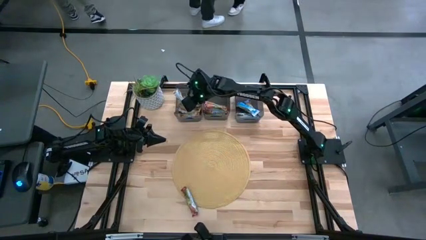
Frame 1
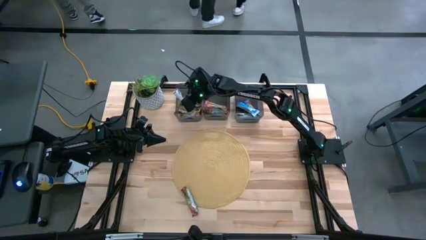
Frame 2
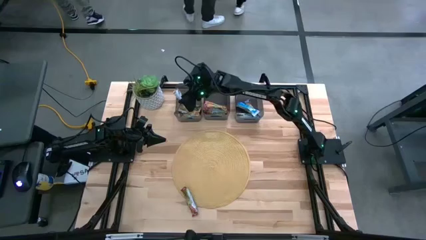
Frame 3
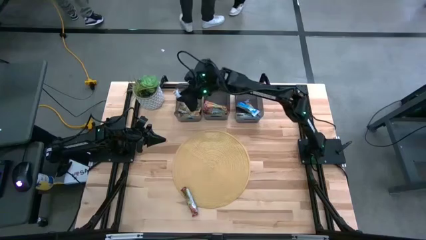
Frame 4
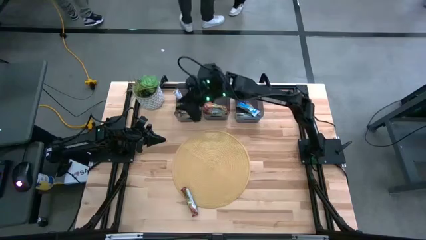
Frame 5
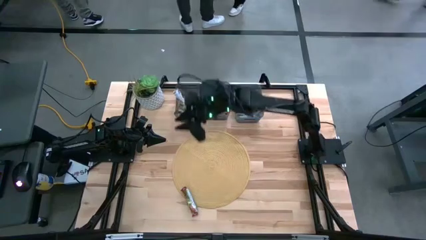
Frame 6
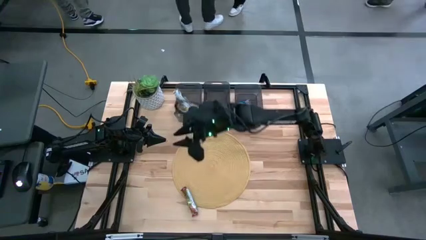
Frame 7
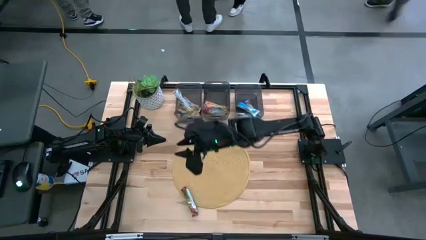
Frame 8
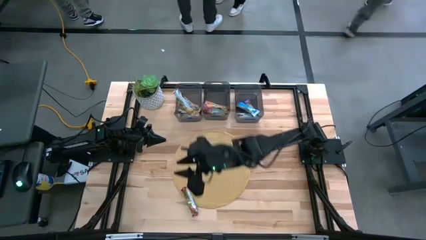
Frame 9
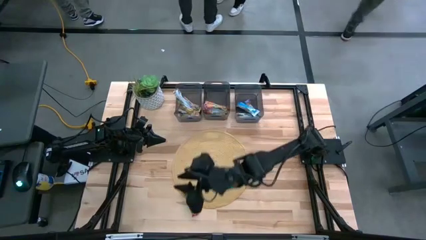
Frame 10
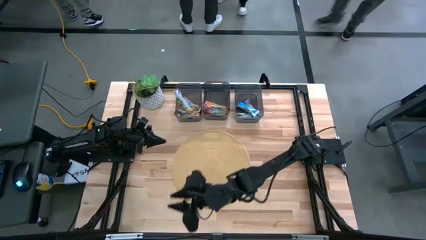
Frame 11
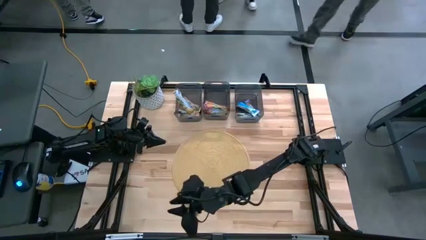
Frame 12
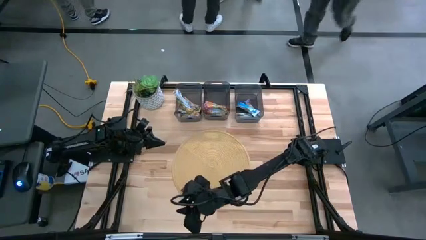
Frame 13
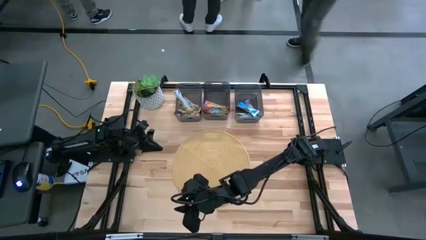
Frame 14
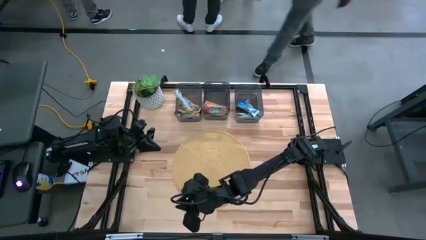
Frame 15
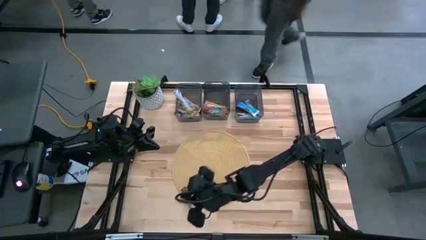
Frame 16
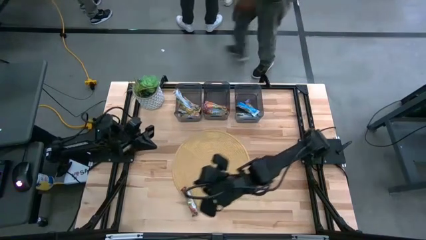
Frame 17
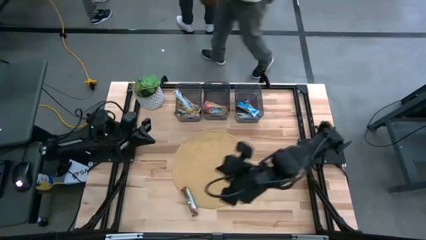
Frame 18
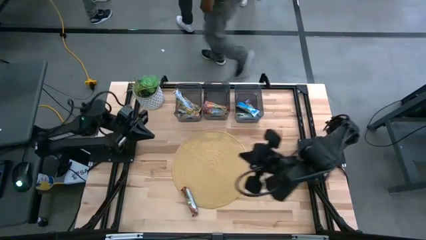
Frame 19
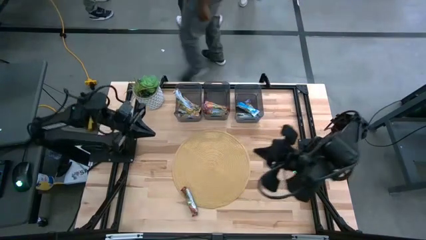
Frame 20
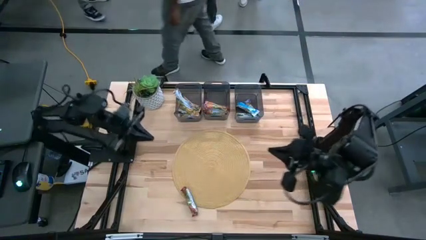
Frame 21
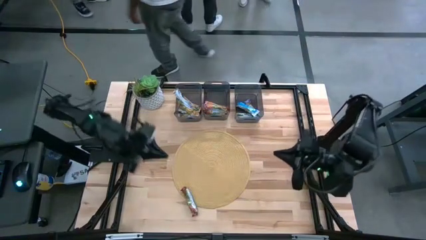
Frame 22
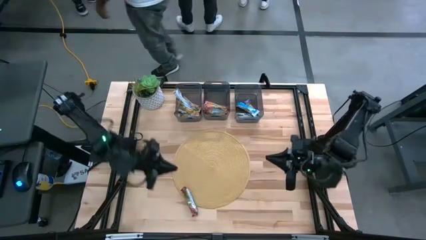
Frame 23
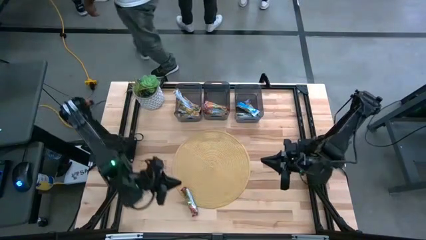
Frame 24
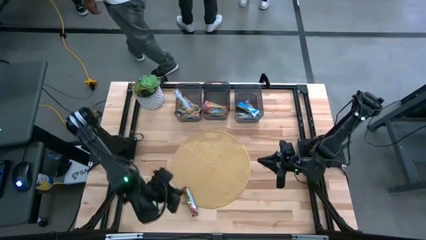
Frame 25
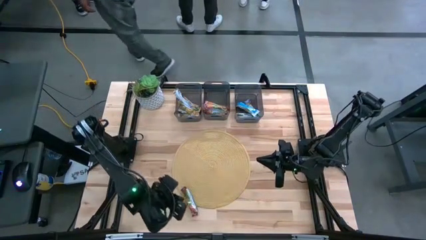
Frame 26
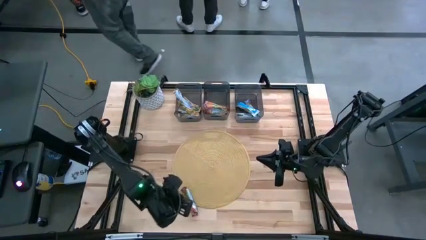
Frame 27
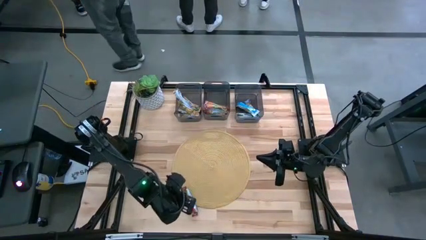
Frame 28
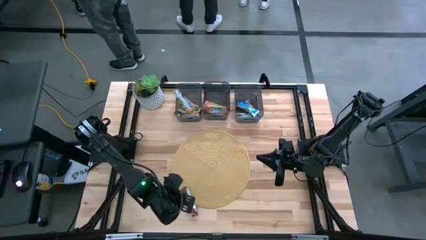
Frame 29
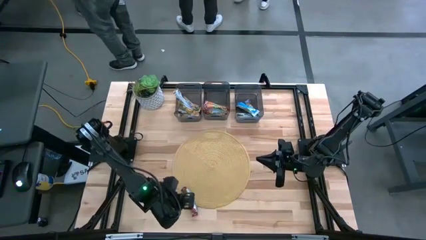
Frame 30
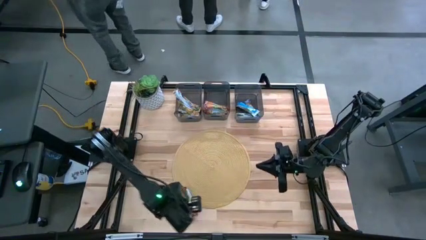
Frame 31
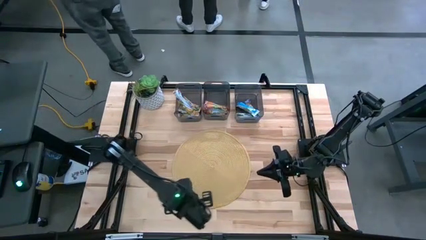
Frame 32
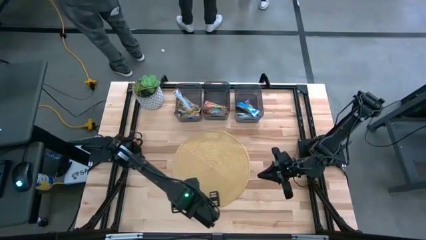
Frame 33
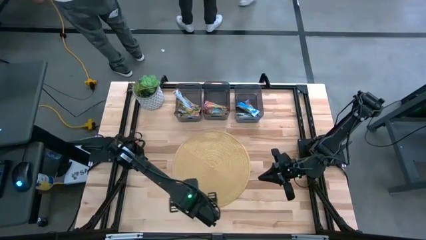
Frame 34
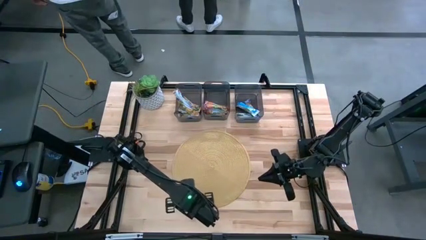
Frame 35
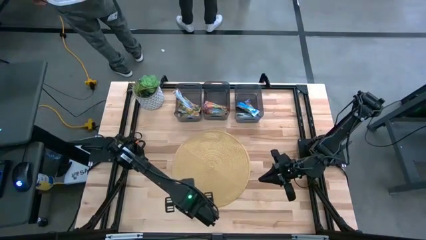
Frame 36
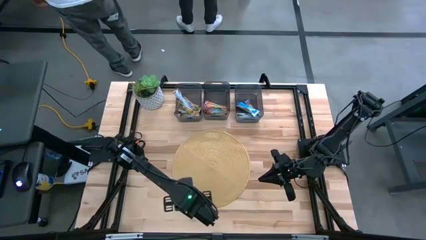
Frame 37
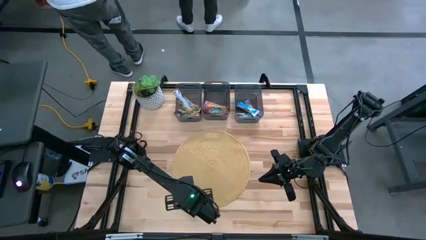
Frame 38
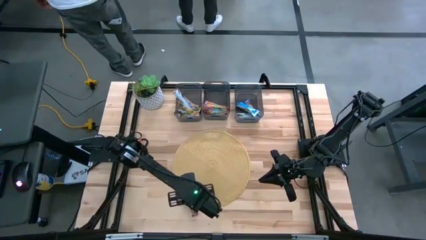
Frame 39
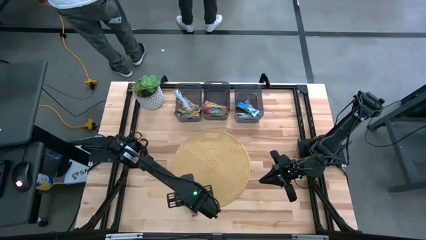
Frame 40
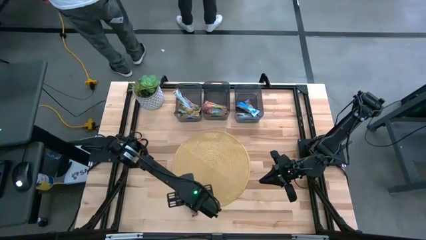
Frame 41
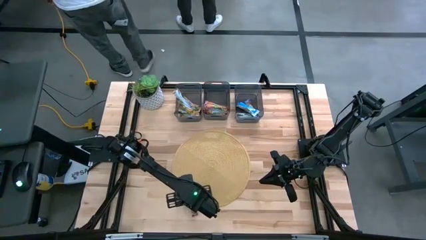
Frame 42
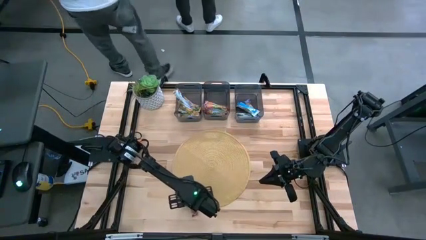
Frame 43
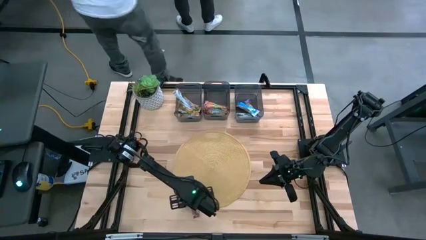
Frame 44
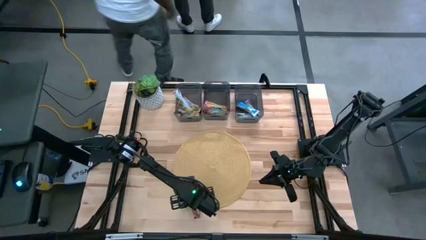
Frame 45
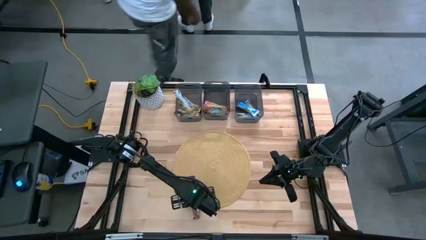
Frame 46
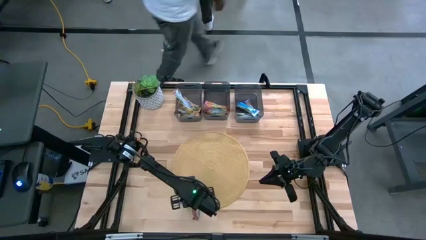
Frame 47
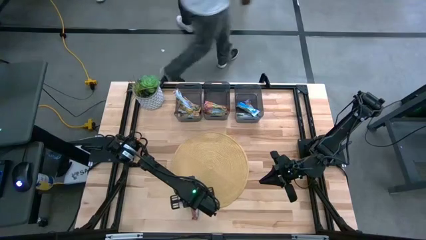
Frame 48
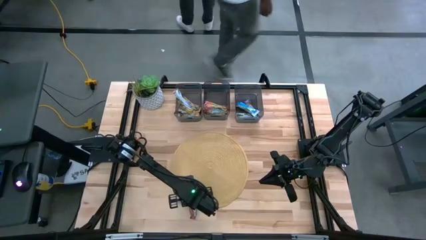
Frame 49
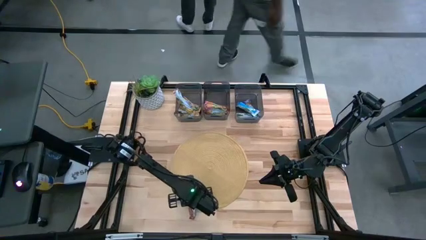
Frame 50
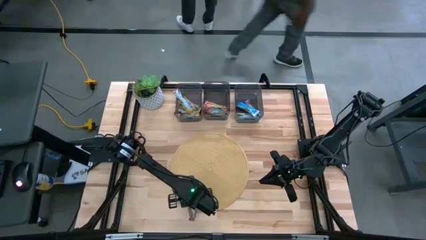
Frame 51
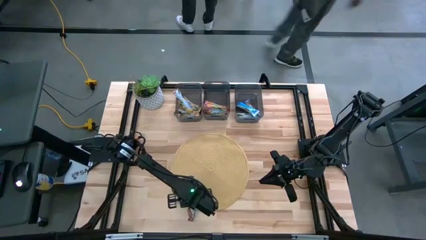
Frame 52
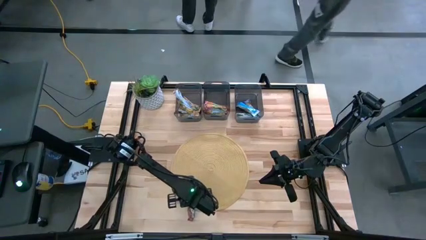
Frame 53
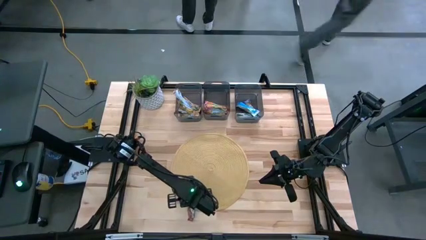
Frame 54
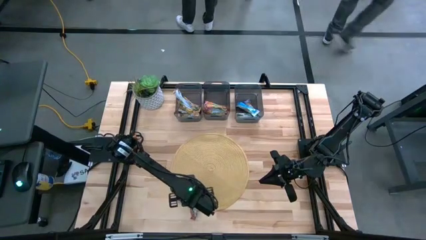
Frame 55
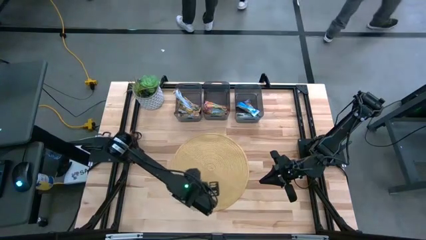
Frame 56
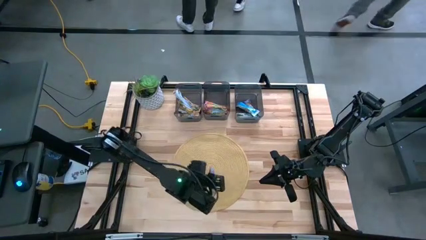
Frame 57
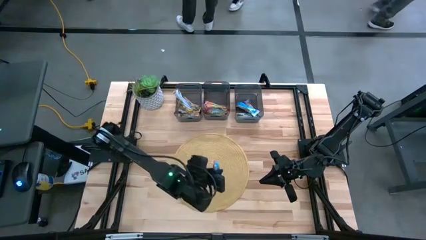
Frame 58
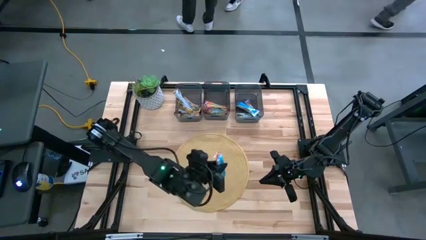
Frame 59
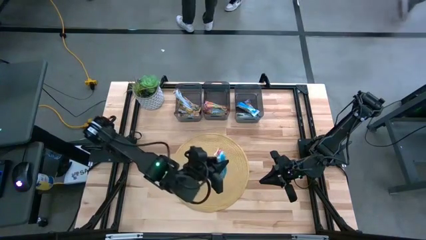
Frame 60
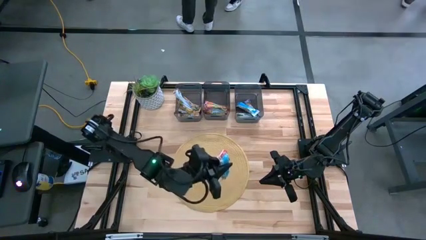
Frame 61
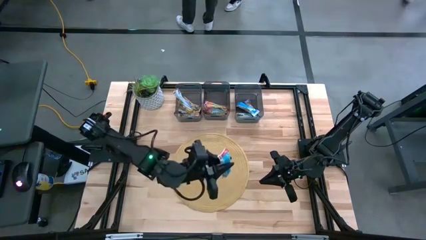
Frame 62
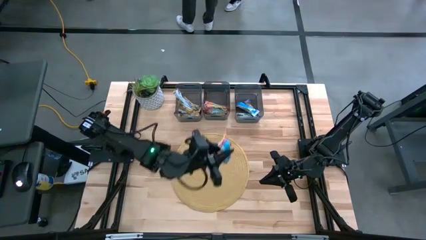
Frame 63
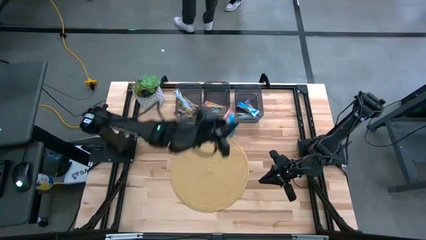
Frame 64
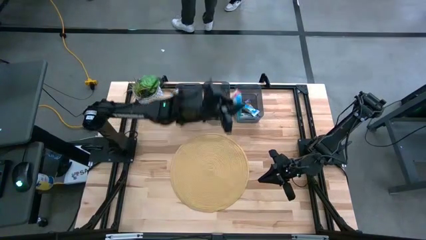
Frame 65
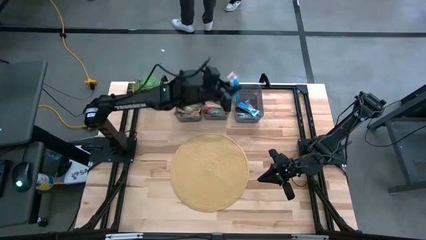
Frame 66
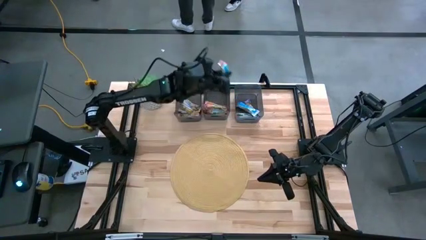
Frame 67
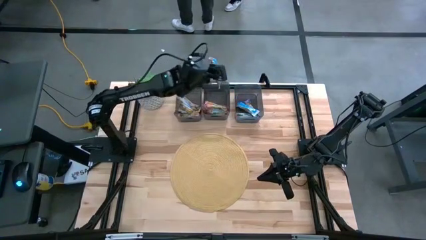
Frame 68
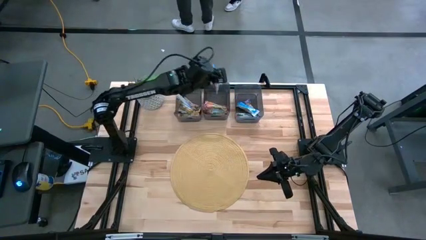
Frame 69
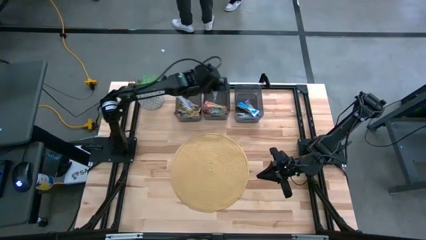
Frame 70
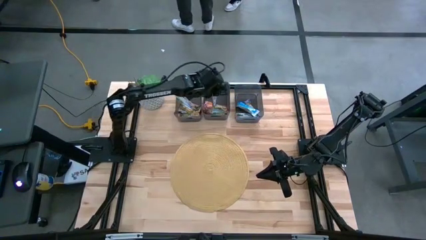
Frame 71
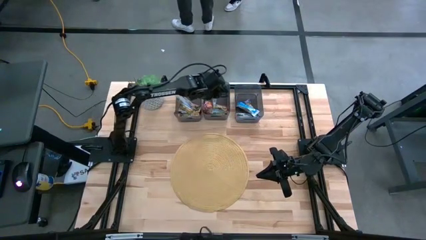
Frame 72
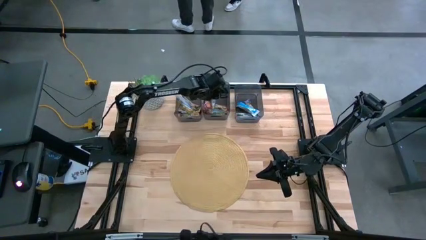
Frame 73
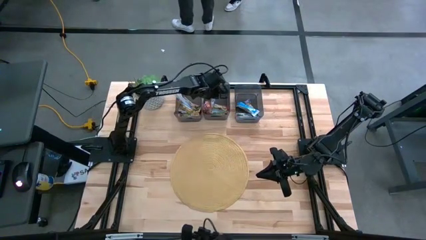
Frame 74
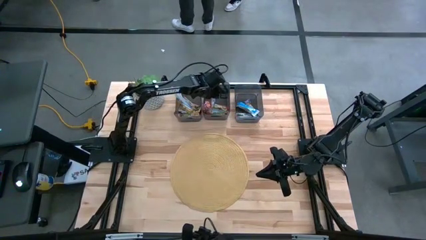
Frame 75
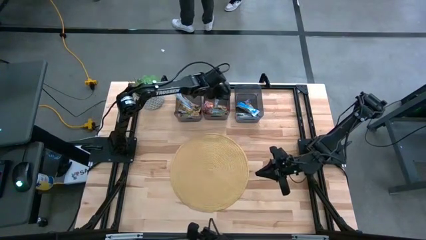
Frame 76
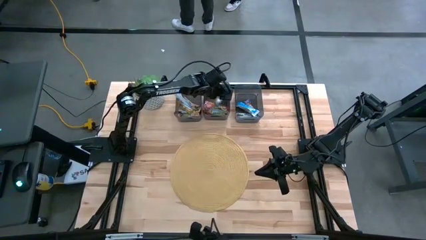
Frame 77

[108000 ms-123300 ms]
Task: Pick and place Granola Bars by type
Put the red granola bar into the middle black bin
